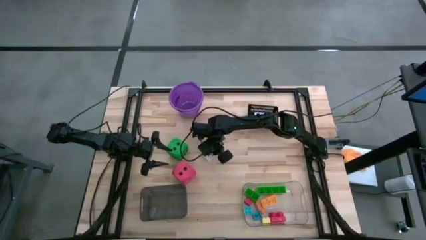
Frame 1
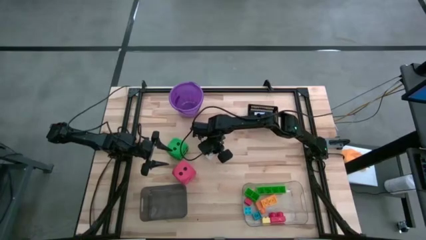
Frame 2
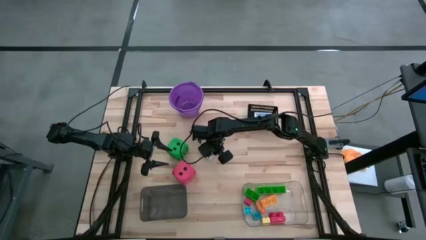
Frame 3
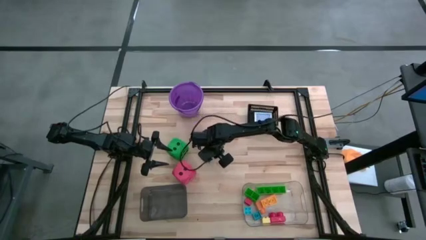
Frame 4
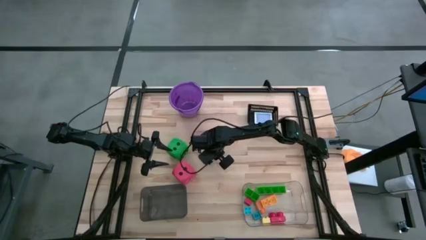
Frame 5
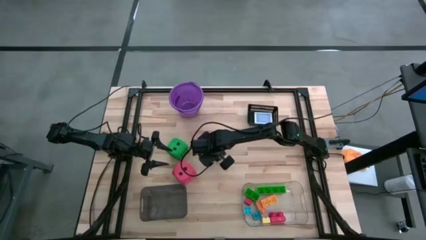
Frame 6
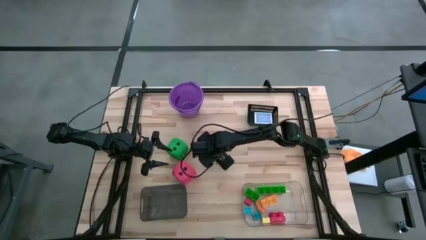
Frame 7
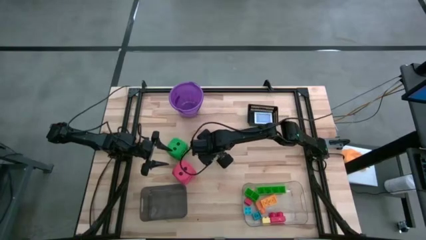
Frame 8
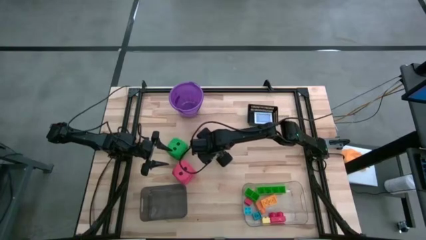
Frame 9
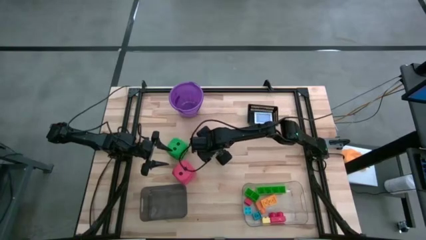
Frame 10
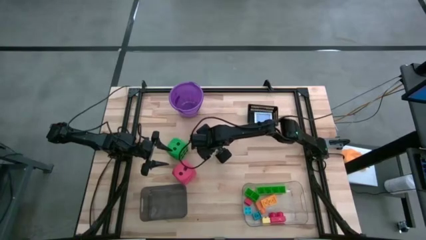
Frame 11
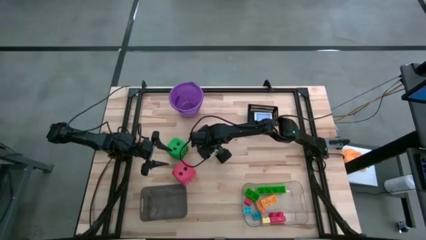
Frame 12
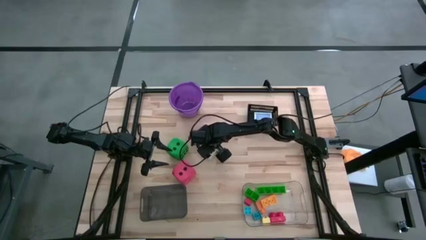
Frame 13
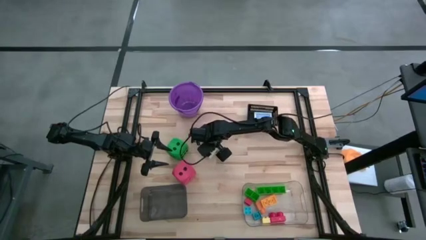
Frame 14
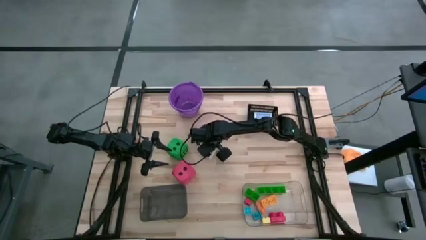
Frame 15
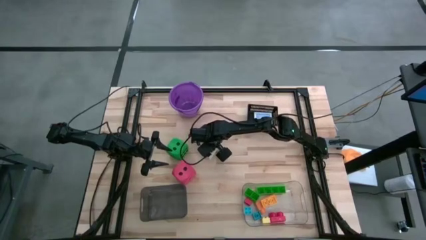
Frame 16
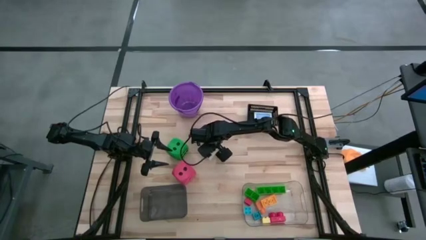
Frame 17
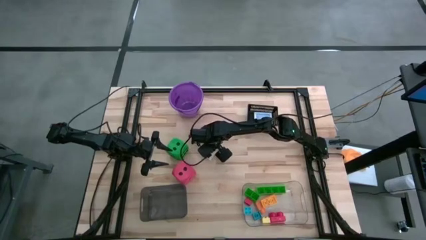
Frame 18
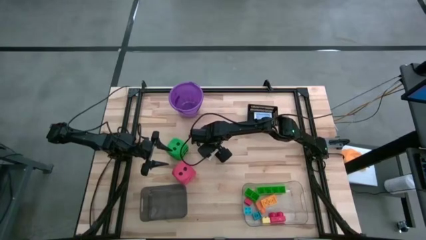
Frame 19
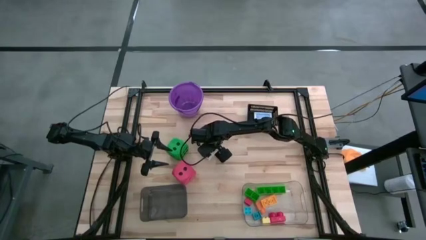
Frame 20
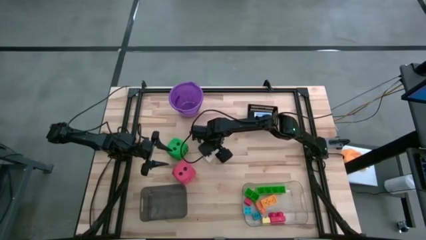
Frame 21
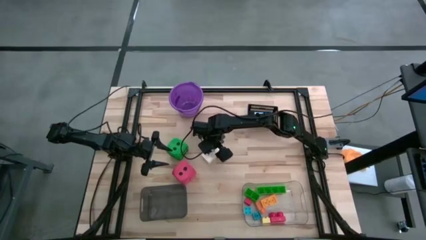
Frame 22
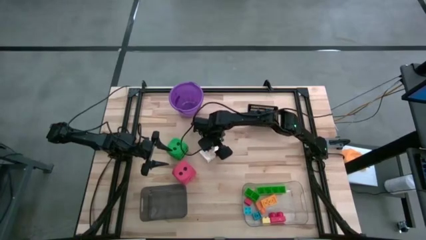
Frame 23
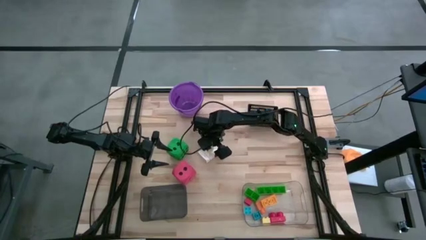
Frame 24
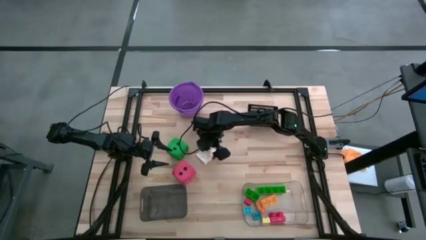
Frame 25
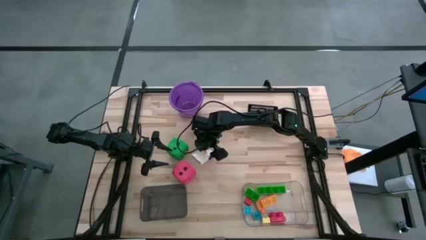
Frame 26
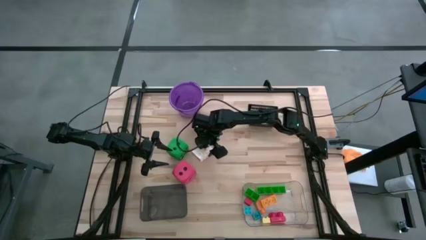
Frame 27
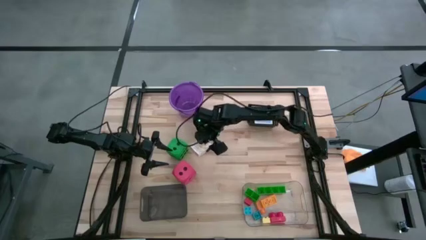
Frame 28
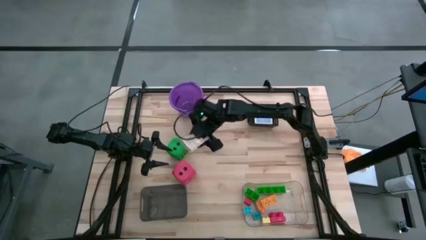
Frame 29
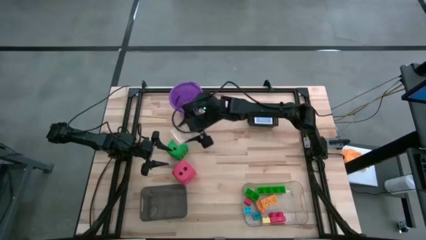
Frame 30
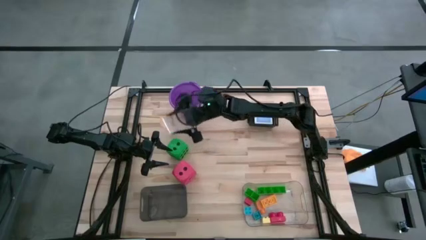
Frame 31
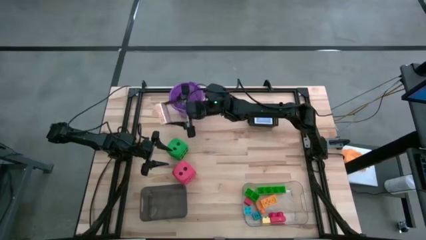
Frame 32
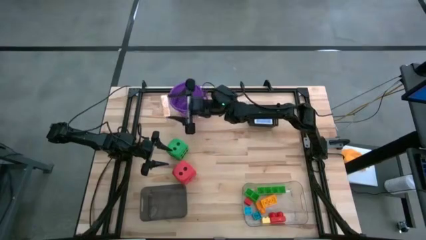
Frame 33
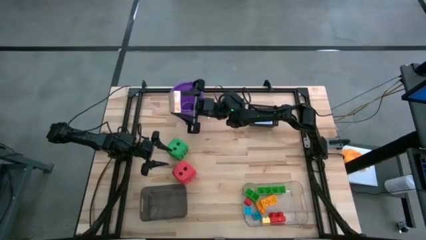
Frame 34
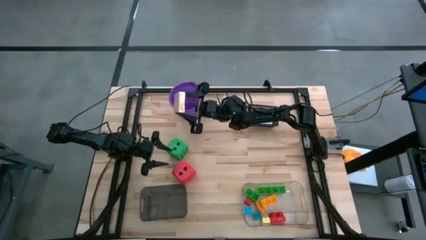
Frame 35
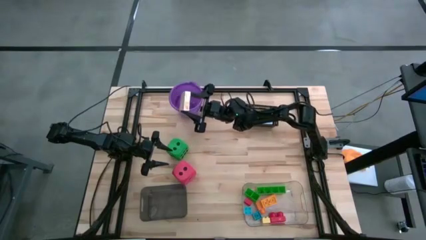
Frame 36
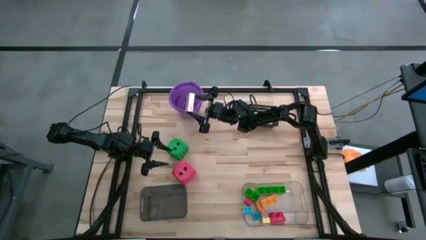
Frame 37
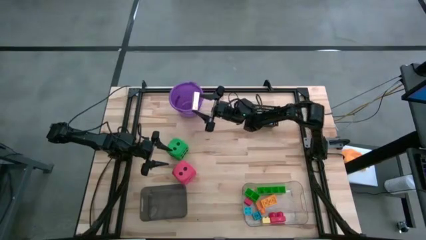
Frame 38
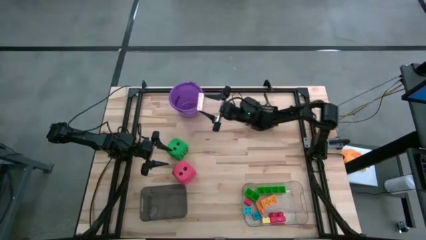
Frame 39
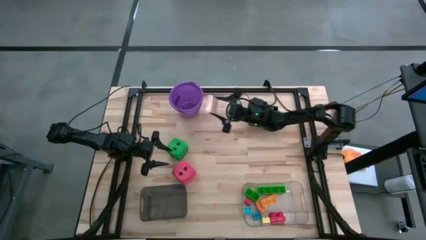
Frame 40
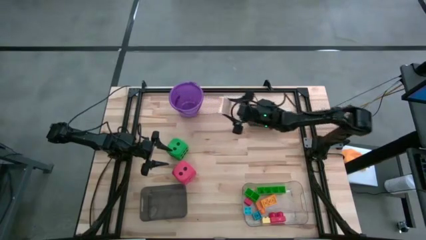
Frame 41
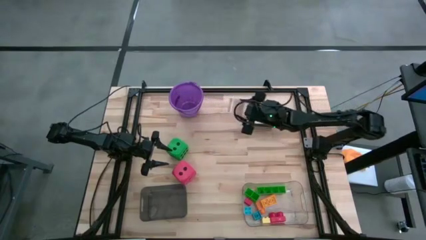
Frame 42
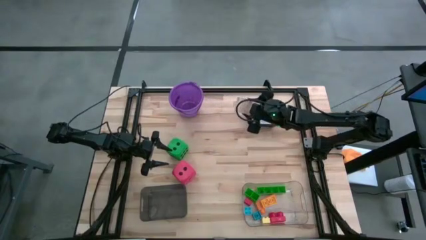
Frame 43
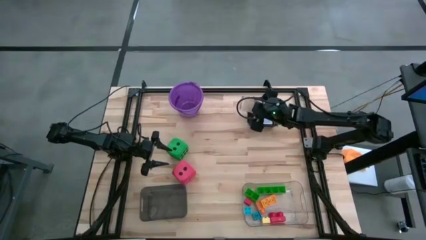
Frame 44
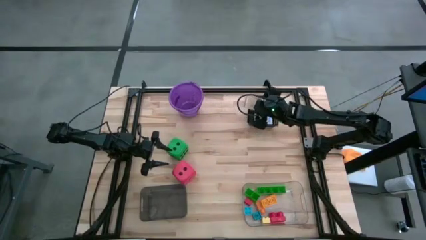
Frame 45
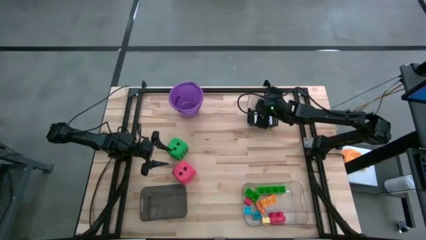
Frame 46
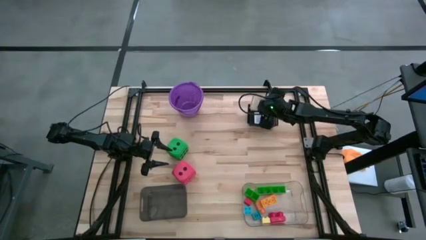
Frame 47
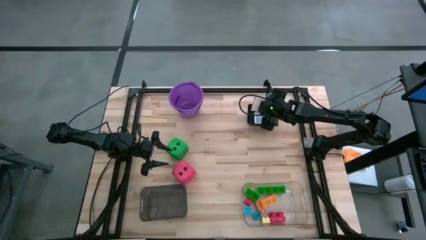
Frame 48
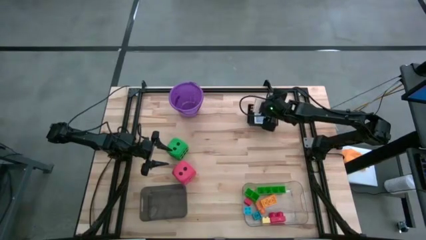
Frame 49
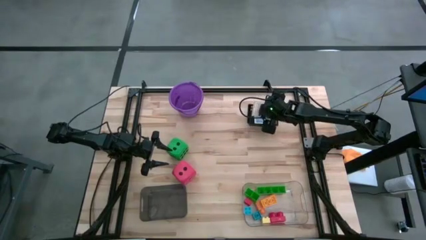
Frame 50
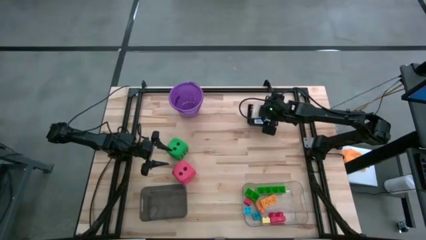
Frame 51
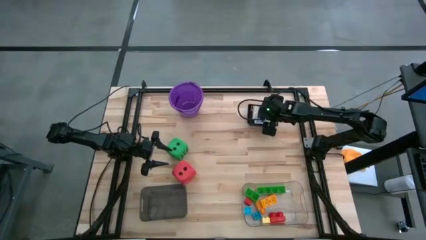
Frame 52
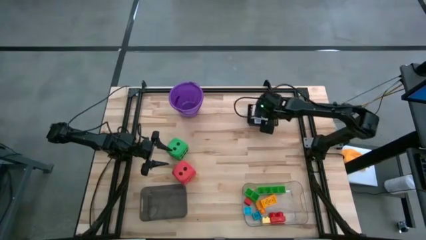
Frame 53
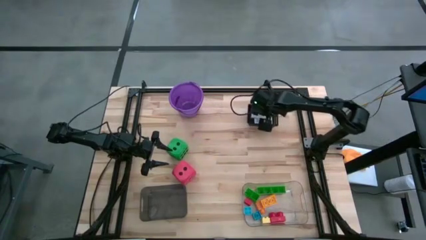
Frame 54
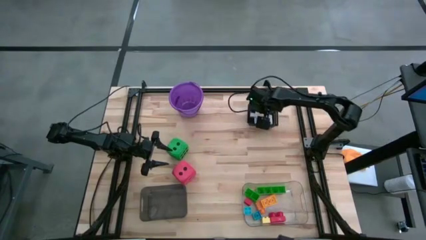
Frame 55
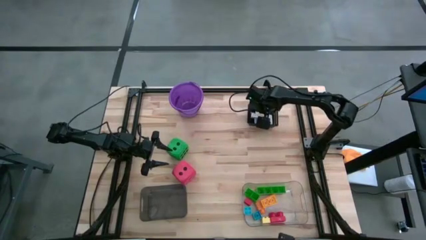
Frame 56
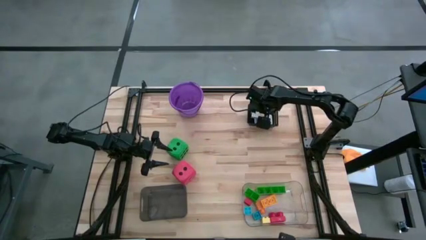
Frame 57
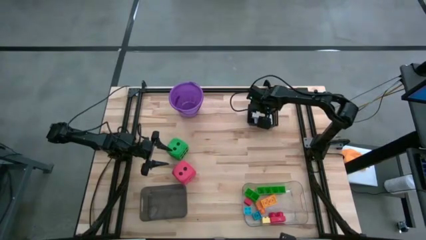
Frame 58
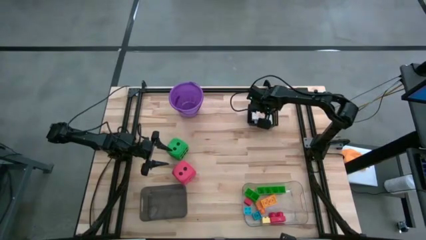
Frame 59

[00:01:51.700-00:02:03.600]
Task: Pick & Place Toys
Put the yellow deck of cards into the black basket

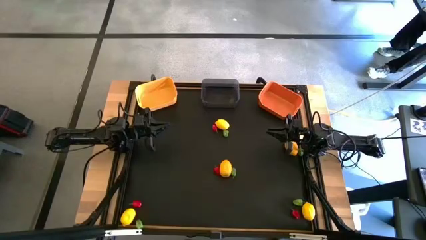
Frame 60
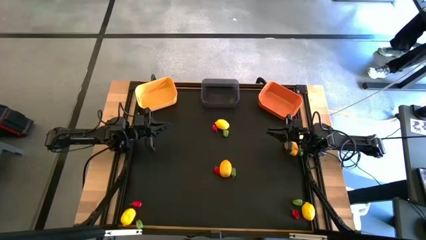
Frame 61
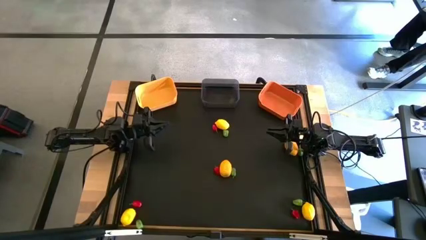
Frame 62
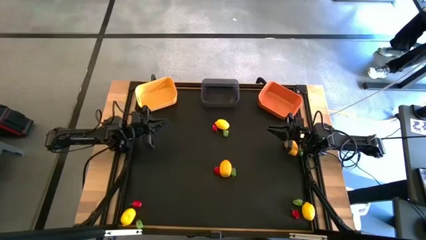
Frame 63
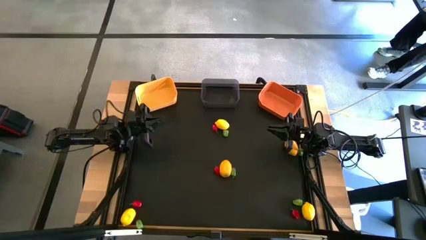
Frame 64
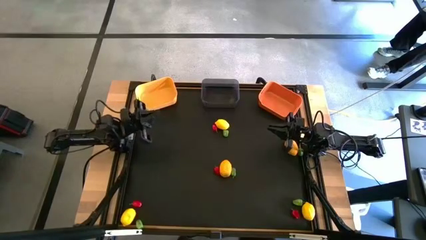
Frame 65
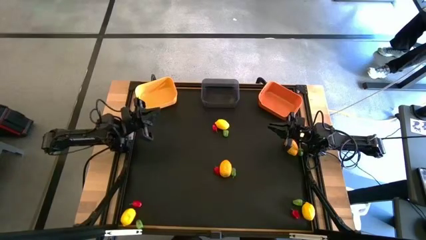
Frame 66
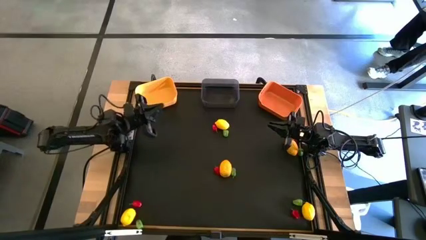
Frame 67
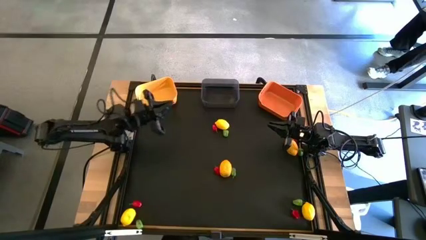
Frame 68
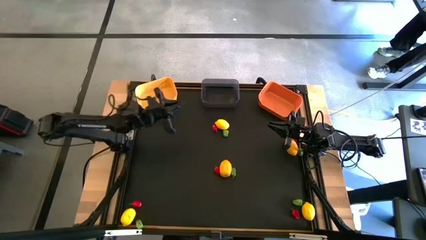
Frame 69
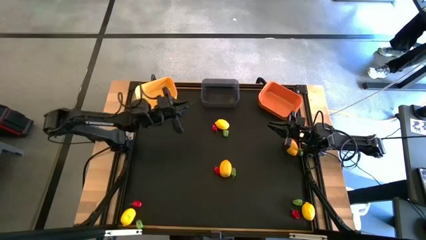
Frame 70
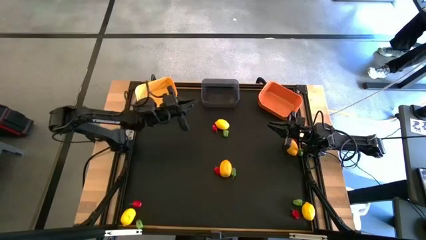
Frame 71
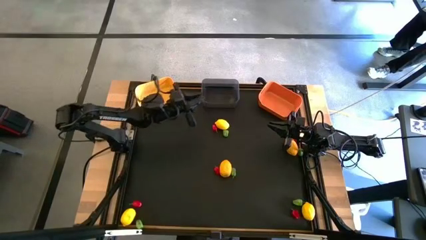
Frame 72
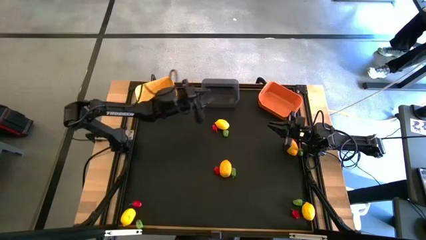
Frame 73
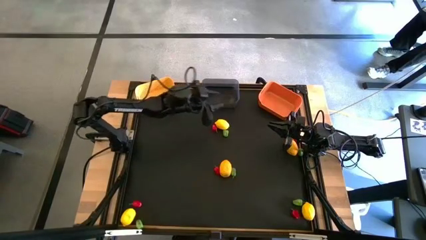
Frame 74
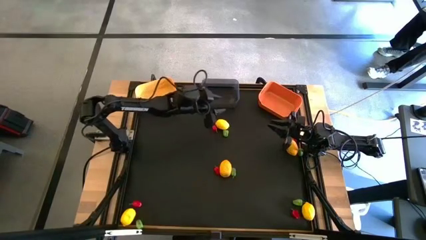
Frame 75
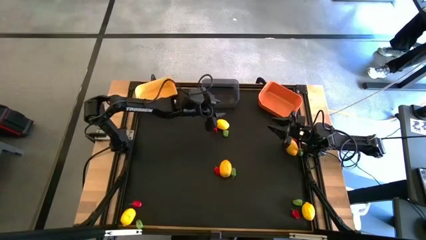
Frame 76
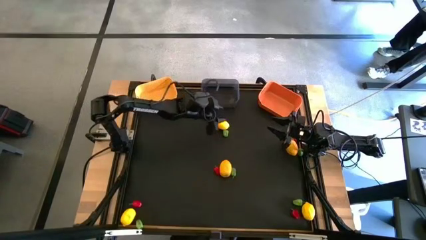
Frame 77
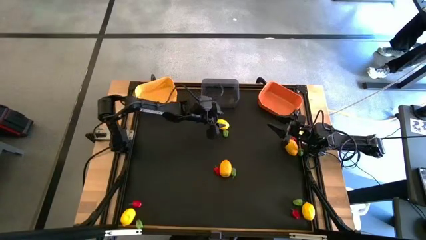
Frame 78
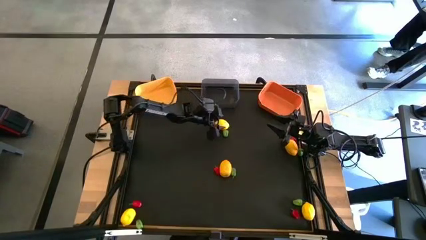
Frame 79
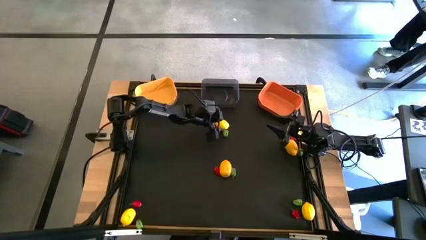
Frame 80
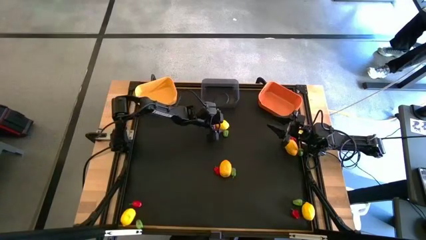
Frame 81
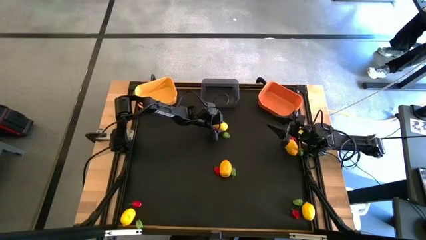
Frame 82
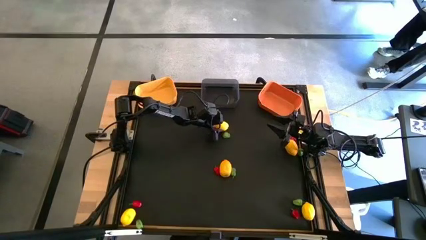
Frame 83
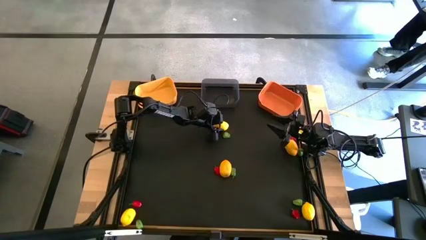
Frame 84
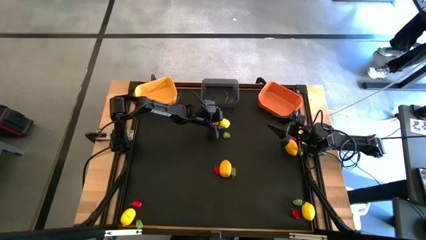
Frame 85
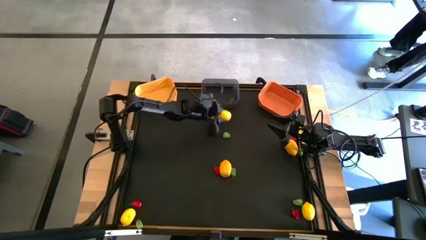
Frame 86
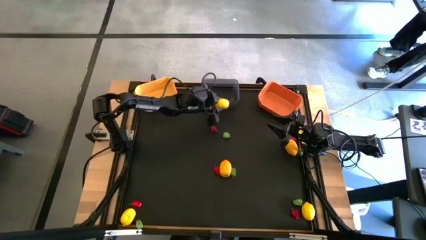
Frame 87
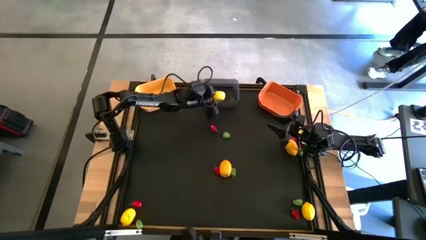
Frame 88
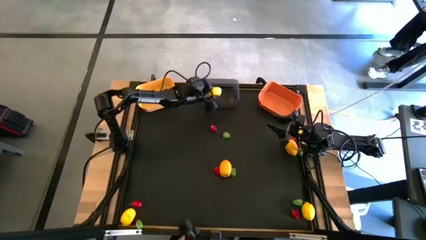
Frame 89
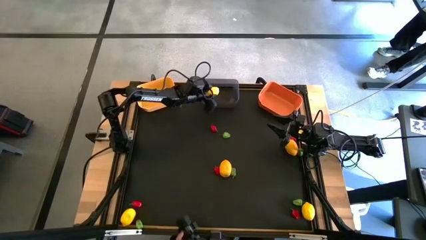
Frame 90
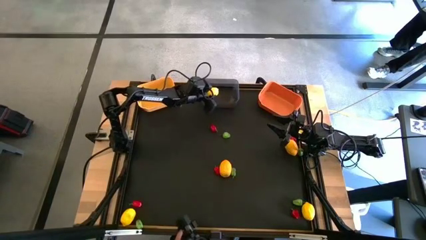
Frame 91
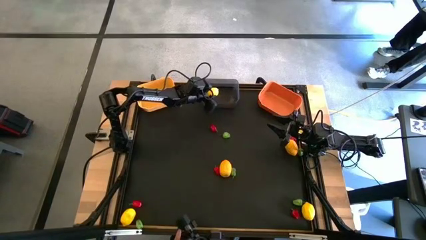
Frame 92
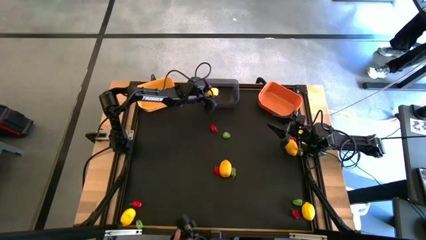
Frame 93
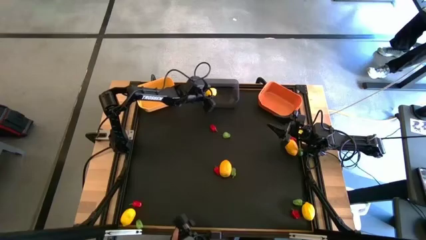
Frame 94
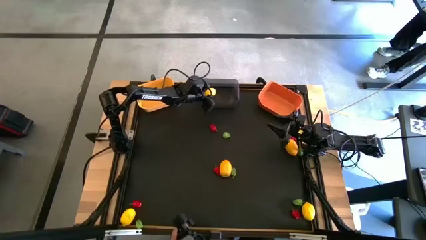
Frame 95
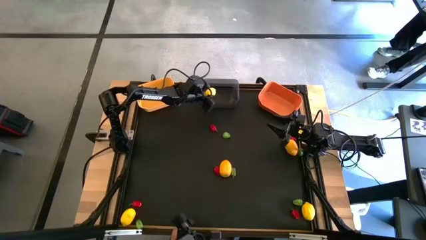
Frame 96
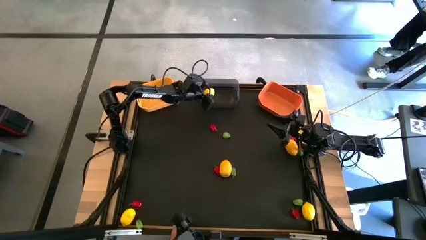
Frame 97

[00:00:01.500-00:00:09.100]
Task: Sort produce into baskets
Put the yellow lemon into the black bin
